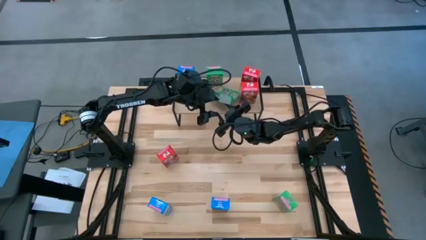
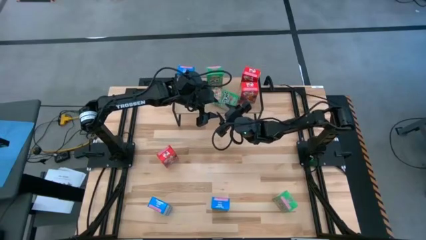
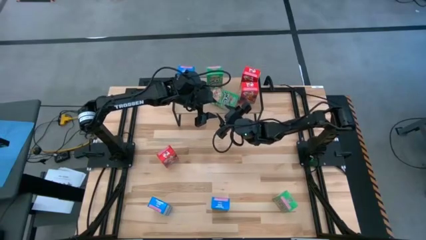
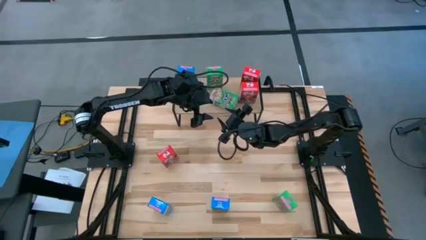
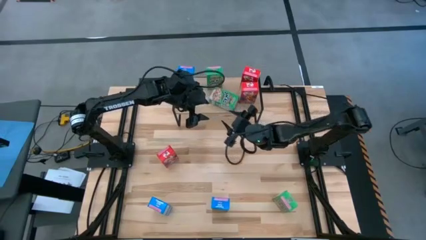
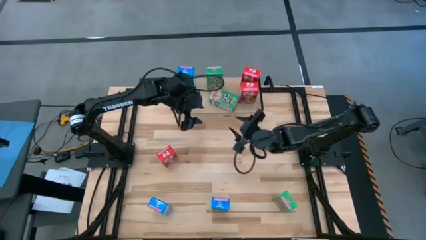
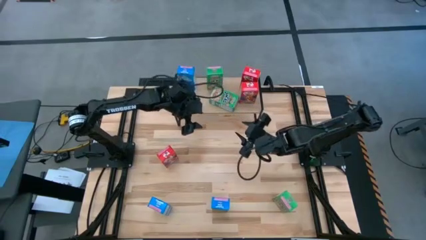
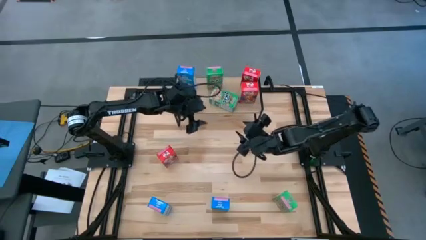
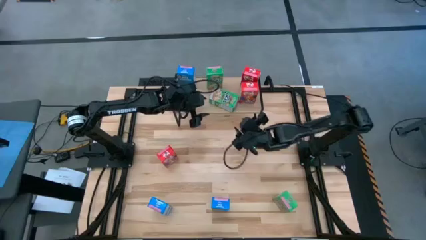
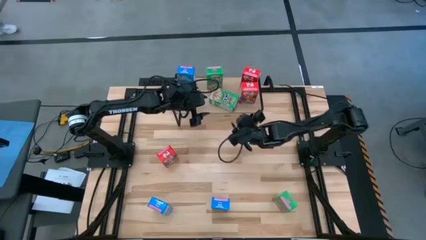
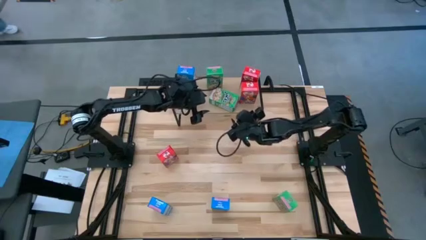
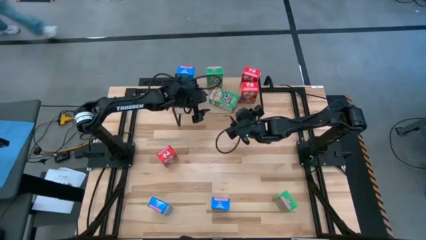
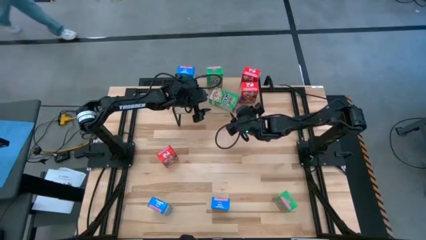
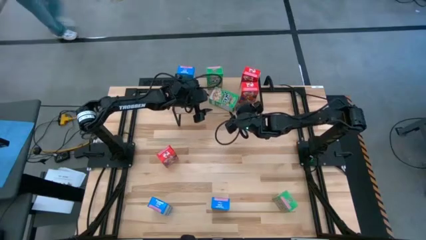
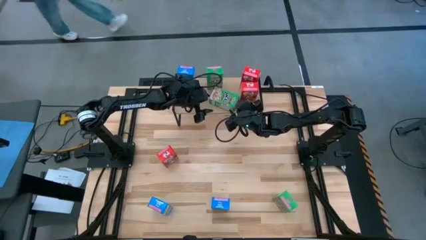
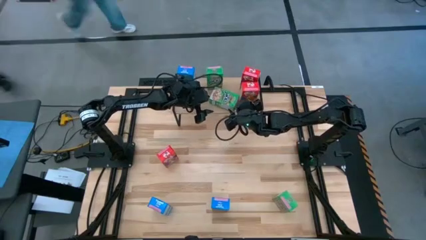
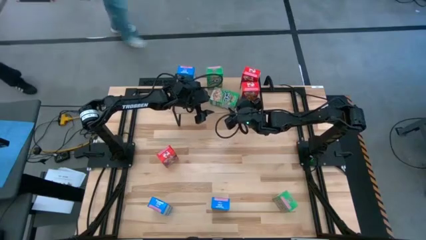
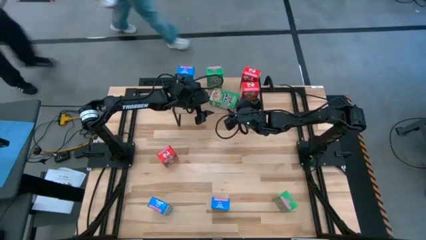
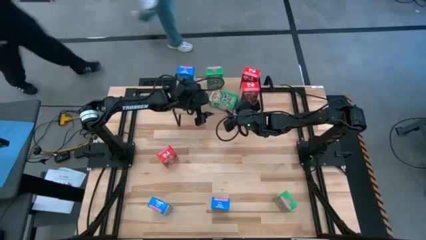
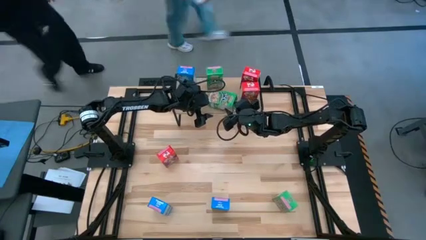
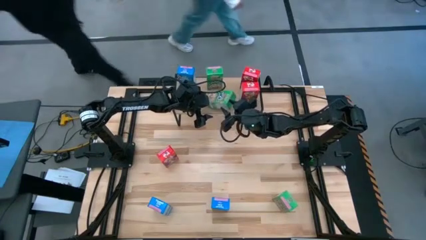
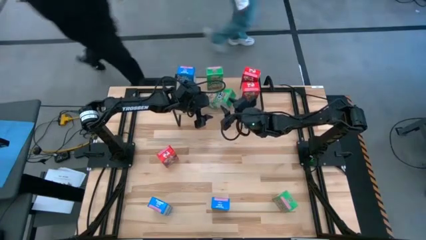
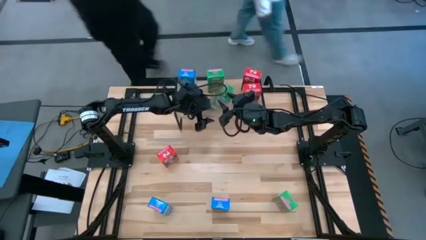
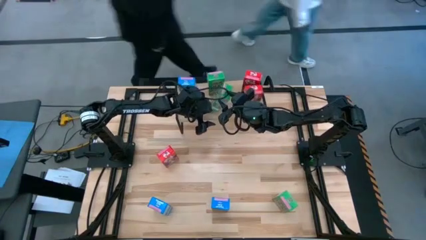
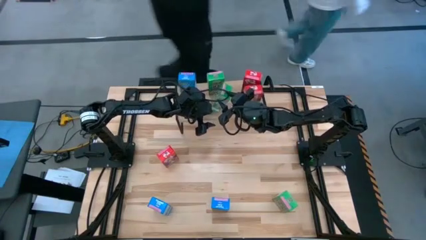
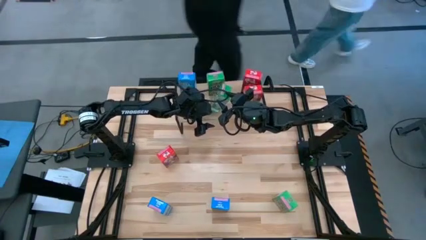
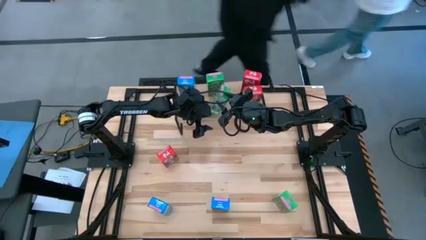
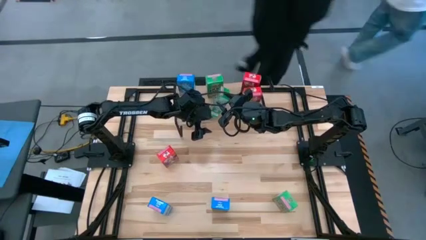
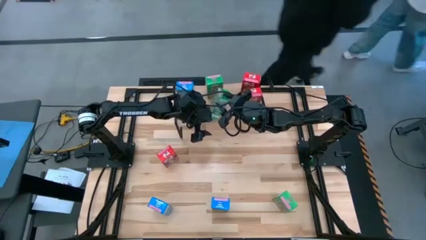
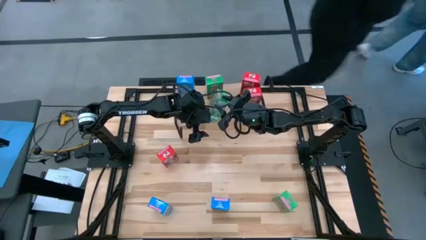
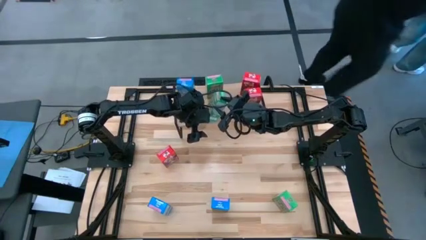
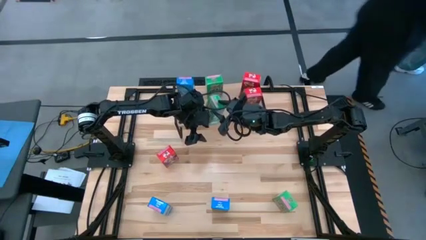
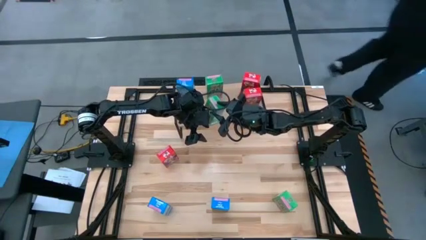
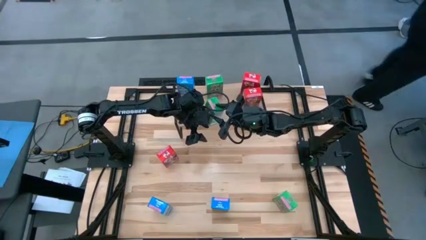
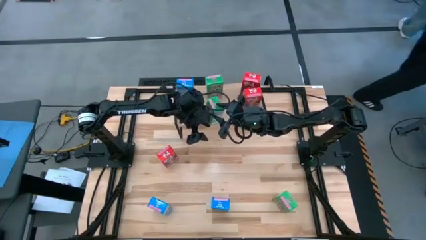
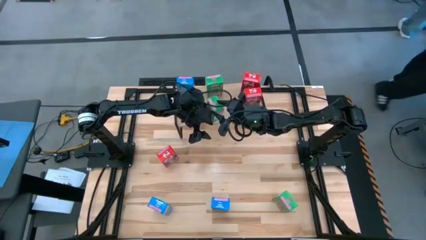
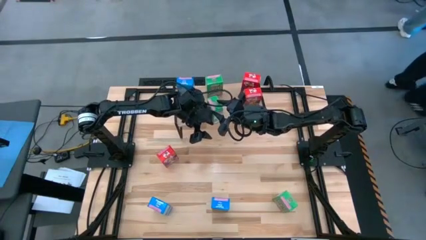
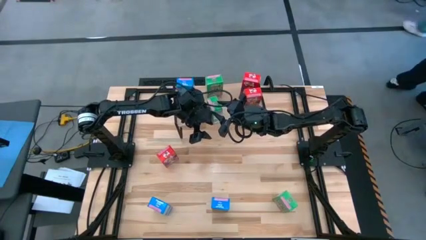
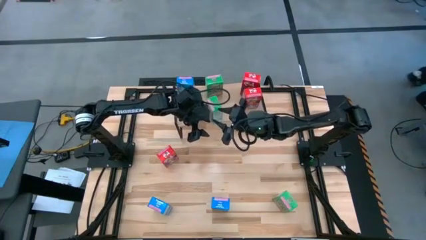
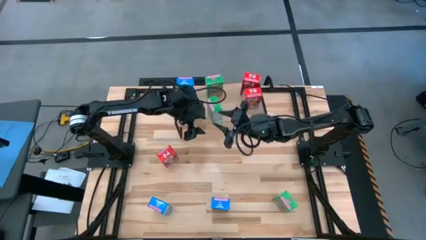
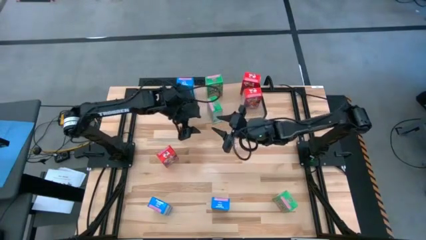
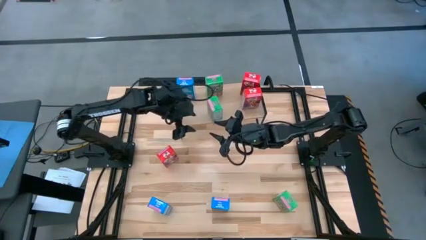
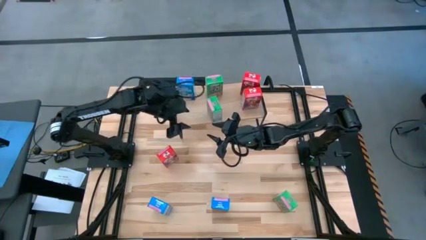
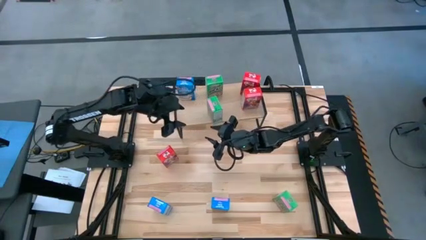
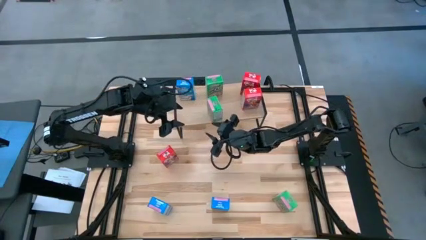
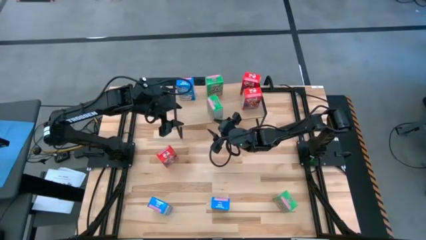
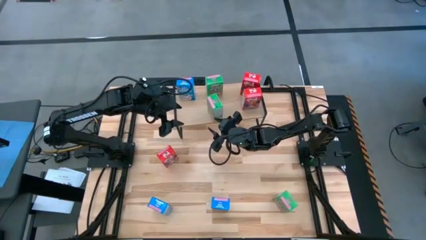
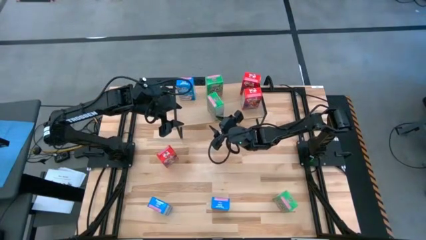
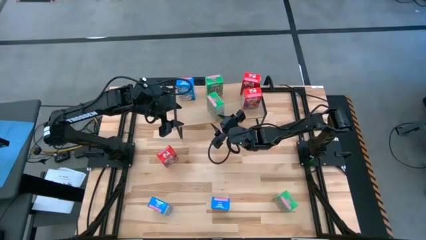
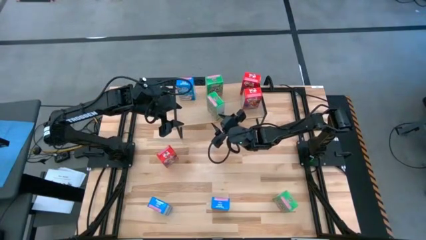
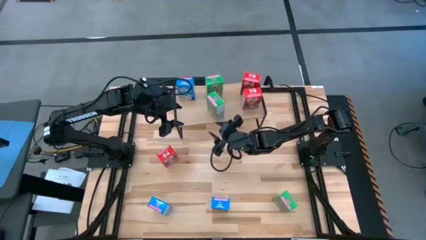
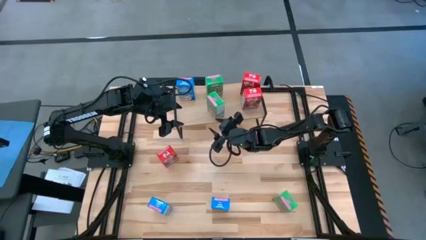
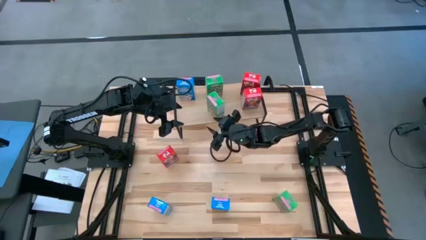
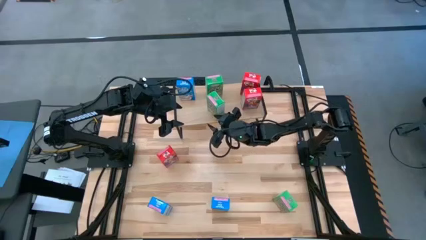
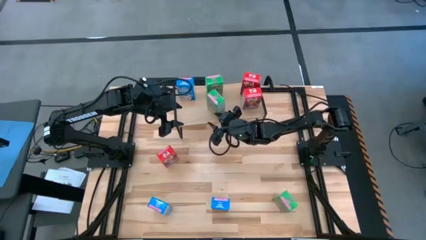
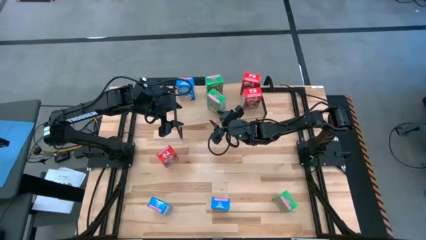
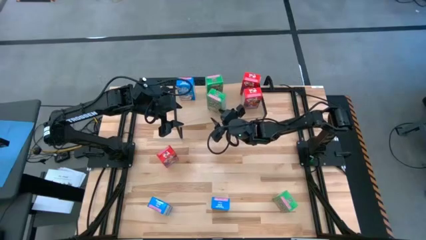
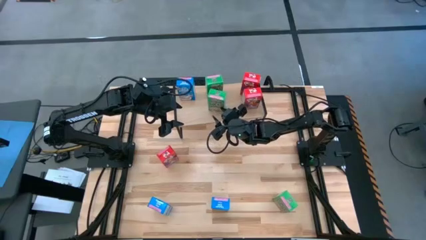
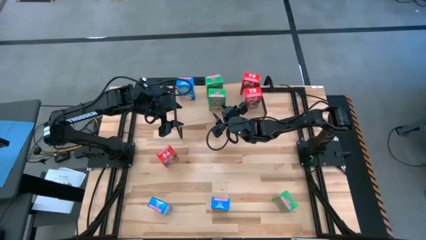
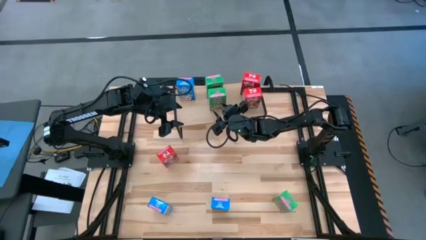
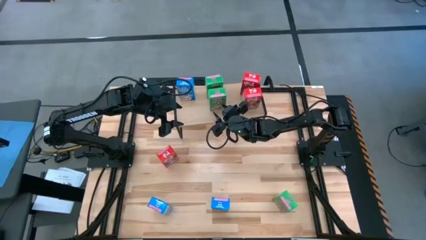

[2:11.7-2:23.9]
Task: Stack cereal on shelf
Put the top green cereal box on the shelf aligned with the green cereal box

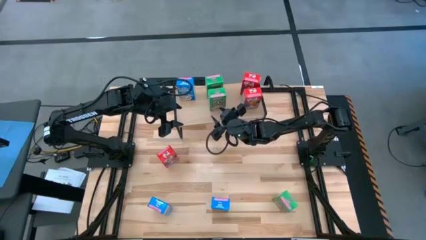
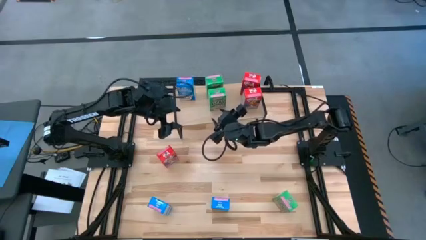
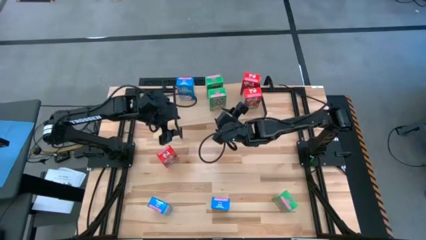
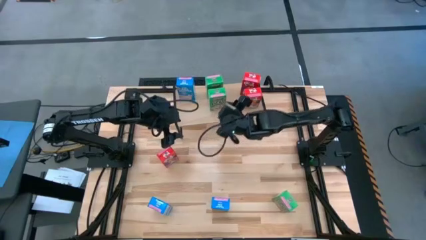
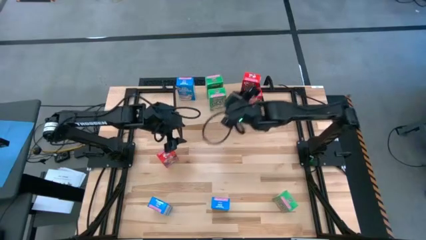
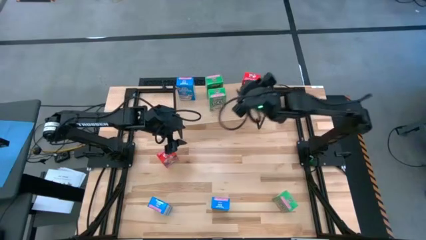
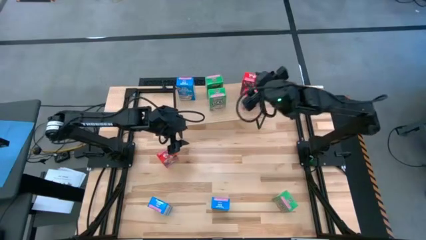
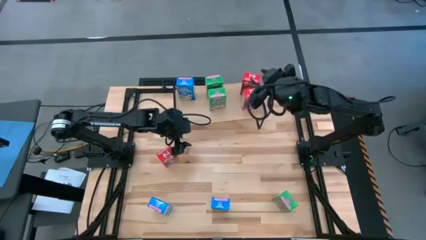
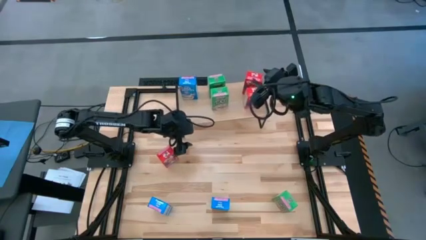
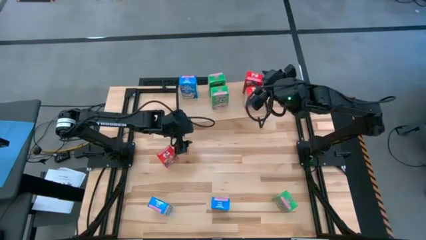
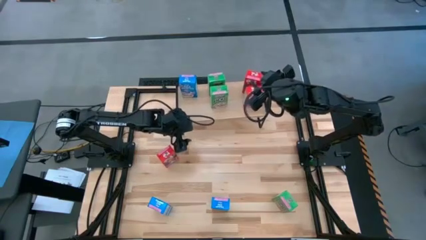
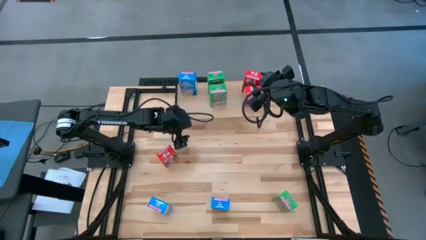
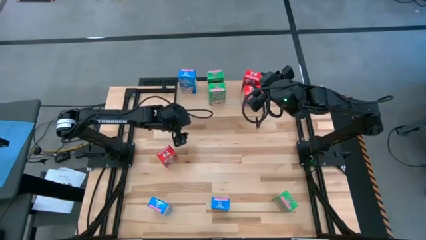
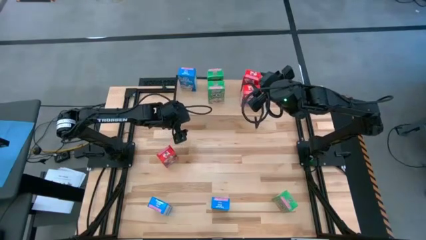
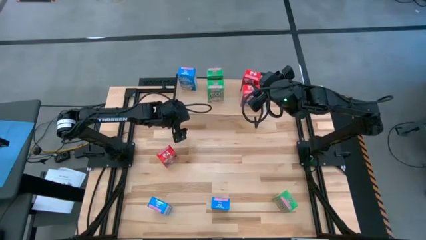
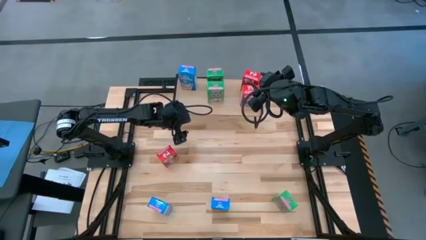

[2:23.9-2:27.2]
Adjust the shelf

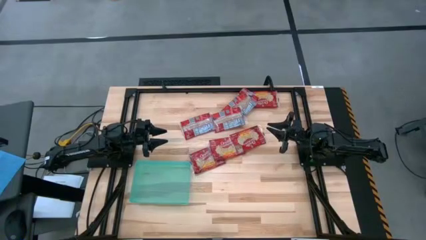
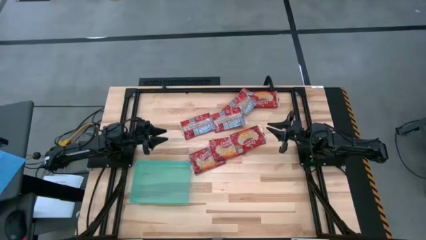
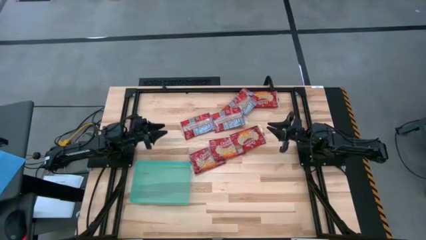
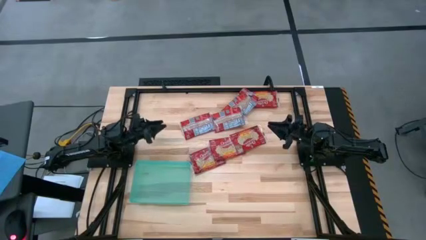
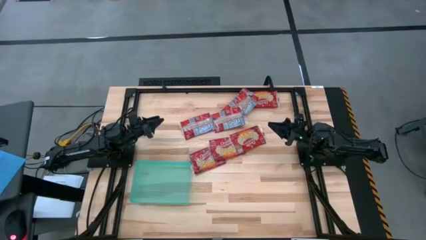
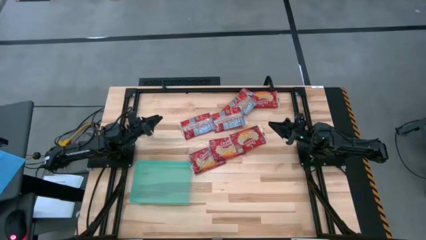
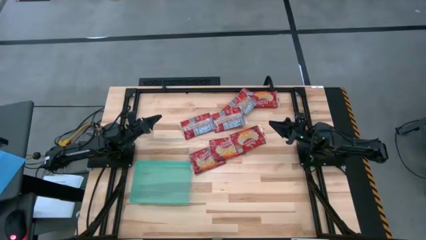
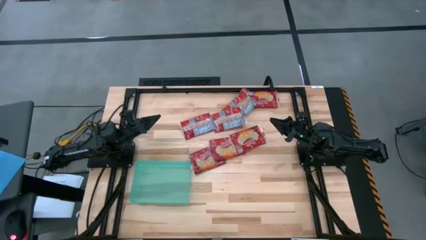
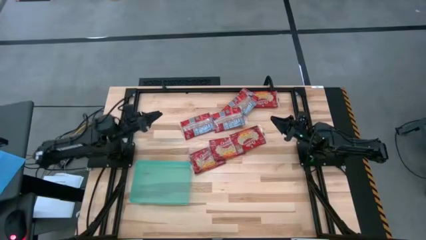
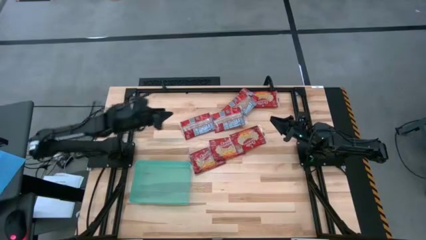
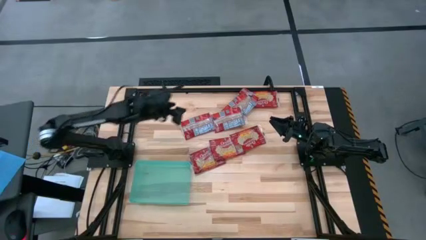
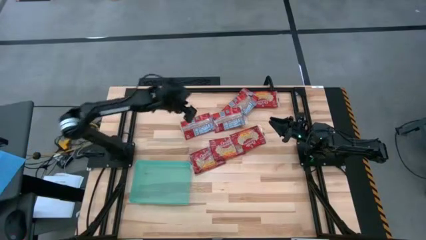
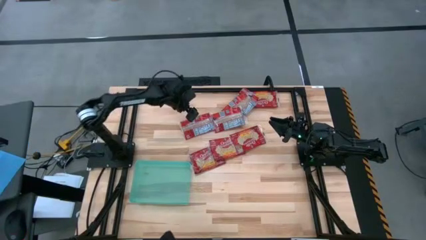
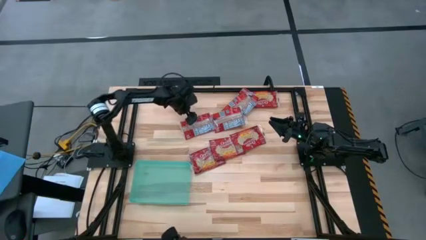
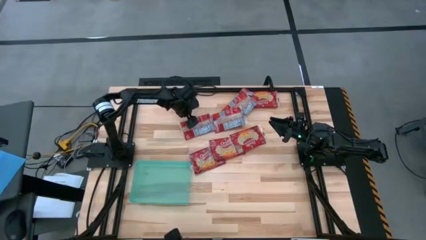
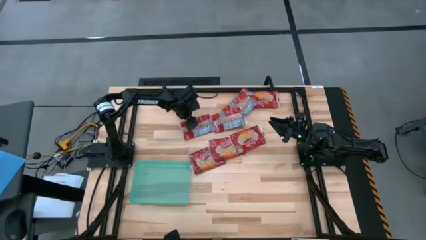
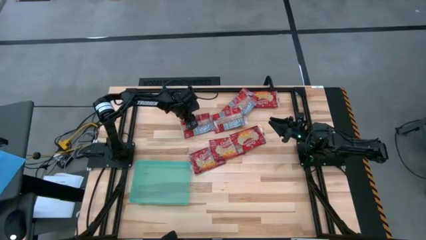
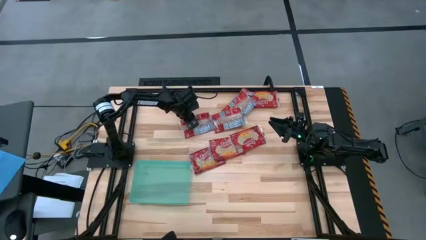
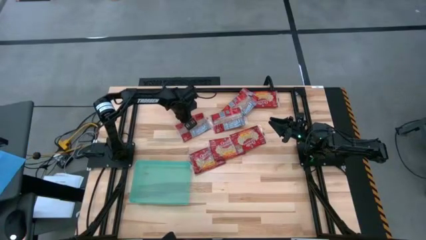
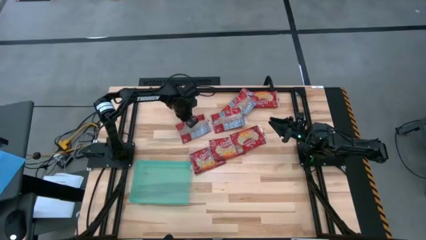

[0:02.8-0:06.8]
Task: Sort popcorn bags into baskets
Put the red popcorn pack into the green bin
